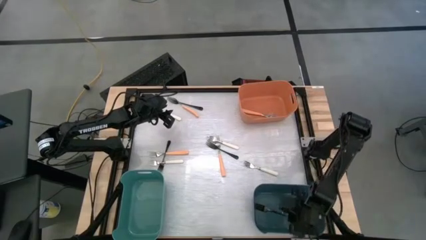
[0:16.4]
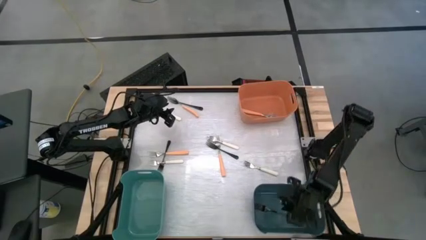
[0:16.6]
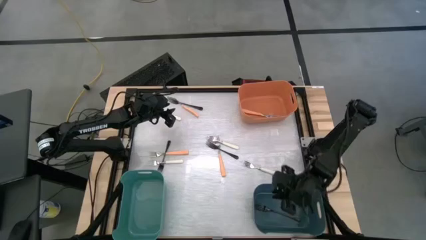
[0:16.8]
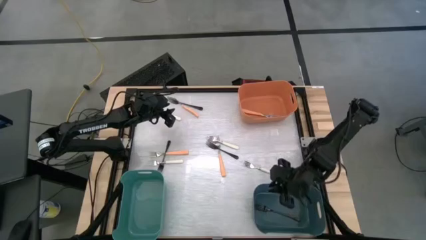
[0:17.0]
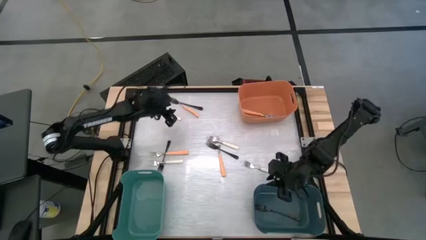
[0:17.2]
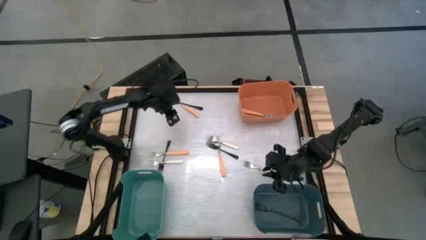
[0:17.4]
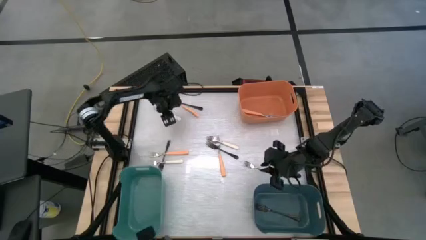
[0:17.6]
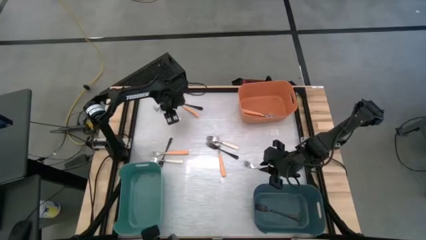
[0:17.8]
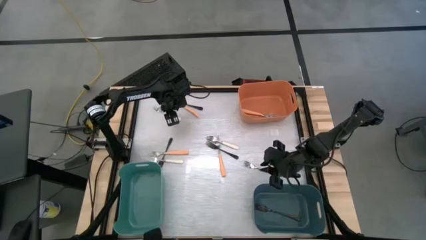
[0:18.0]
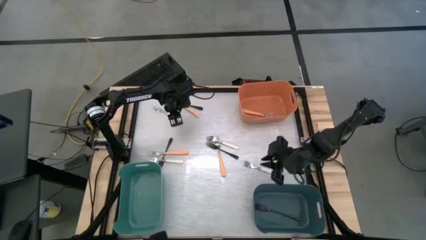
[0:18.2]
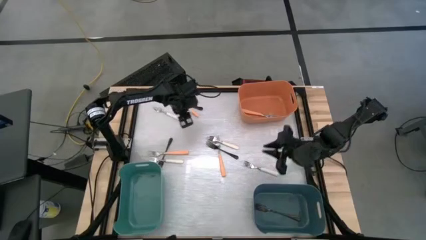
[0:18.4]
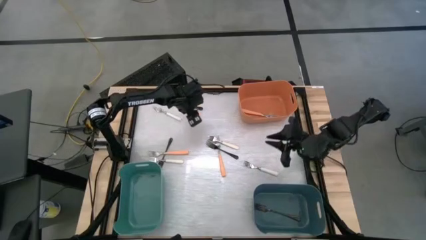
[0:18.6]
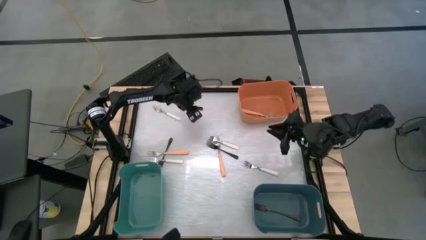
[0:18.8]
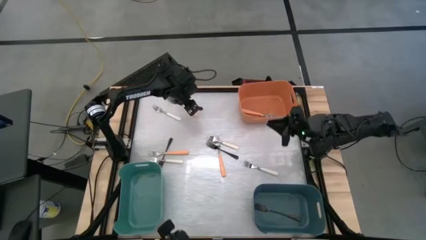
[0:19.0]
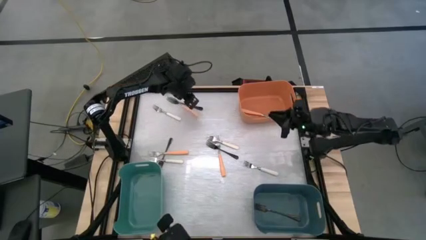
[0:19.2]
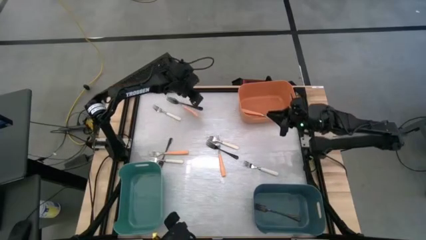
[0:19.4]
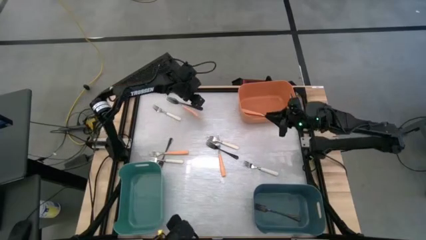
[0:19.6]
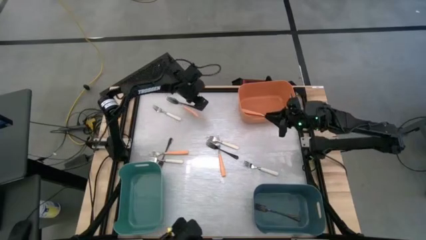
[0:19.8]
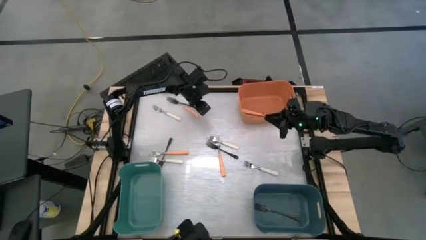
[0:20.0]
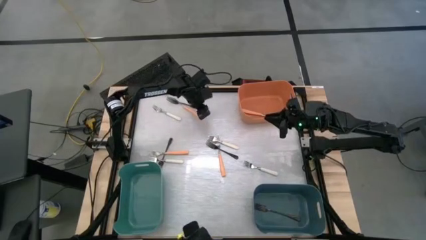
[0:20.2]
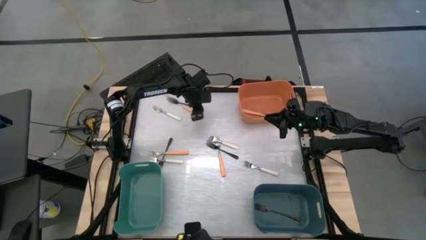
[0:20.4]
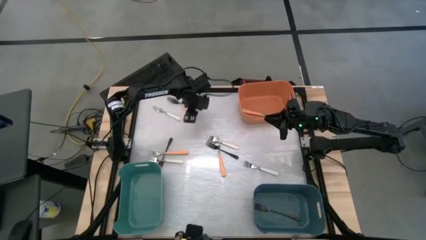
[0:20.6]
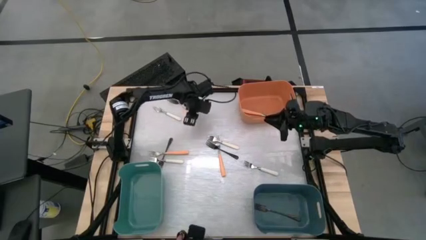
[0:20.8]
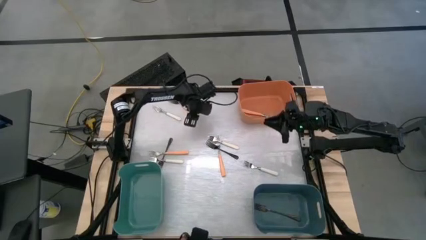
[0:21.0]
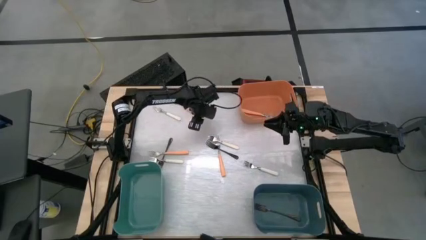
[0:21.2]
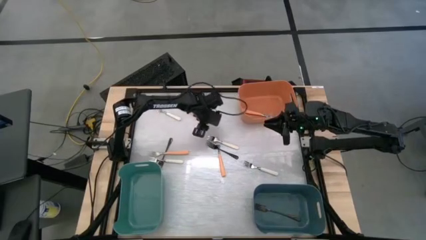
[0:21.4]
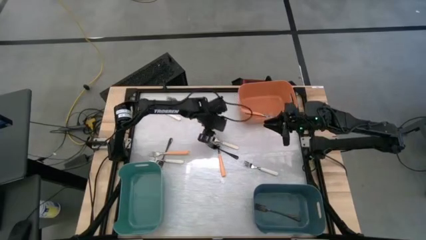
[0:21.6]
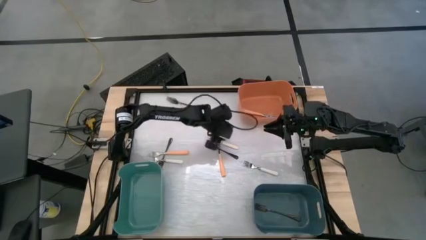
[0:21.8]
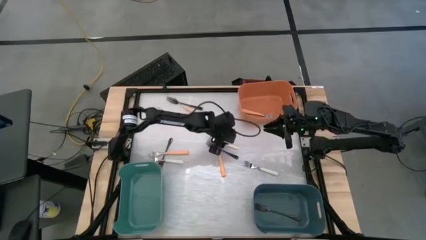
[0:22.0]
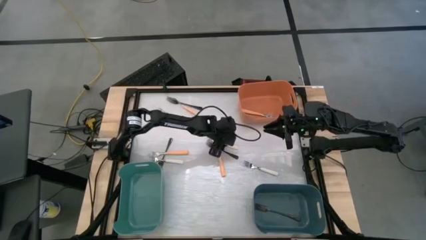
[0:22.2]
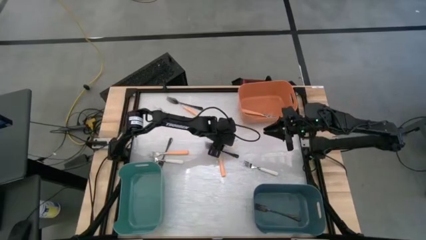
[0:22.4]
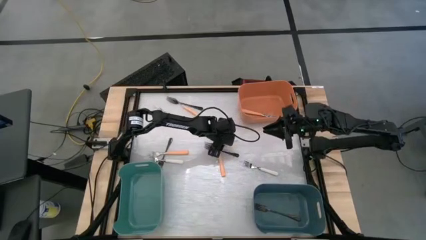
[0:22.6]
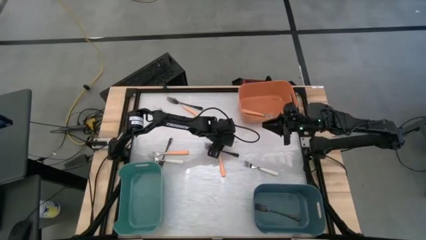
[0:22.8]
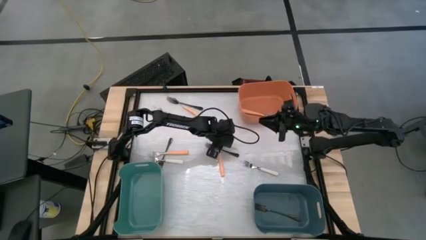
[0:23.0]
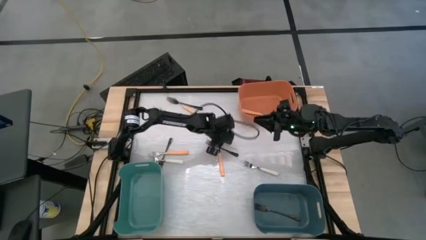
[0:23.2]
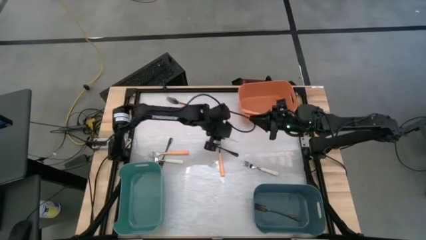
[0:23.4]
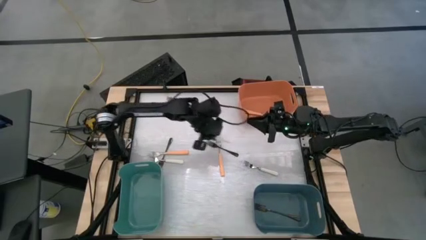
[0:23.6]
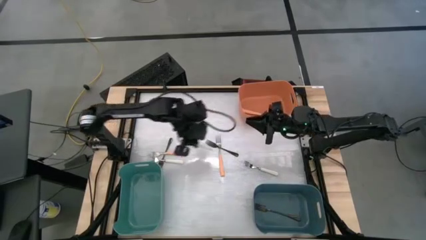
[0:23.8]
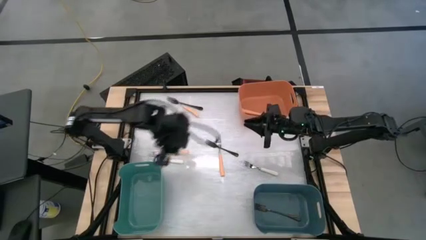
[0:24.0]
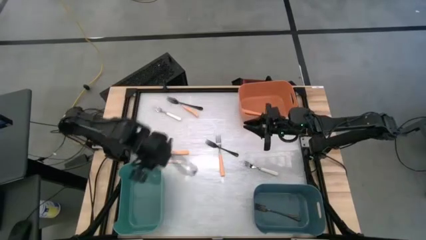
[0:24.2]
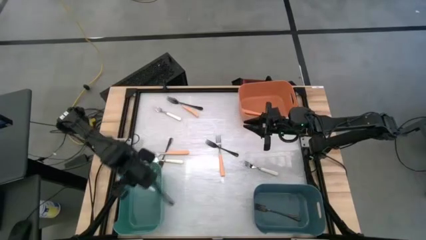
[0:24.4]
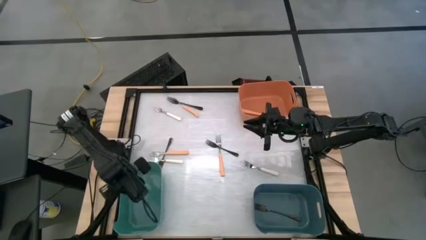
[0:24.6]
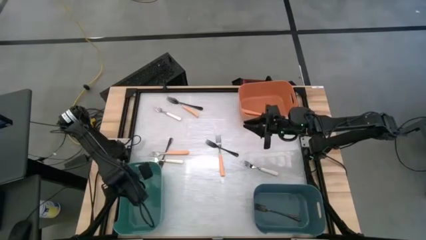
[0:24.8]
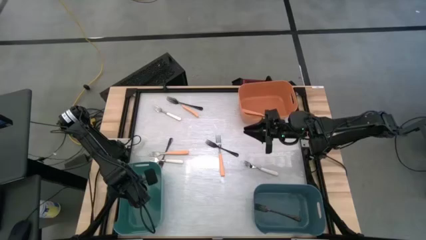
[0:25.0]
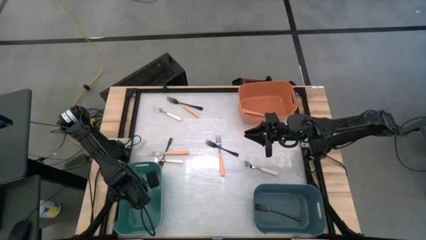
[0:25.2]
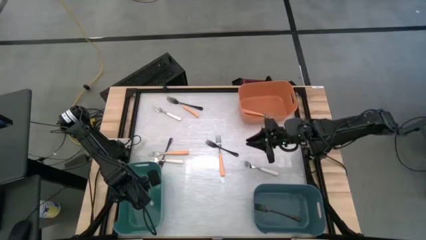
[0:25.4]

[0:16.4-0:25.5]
Task: Sort silverware by color (type)
Put the white fork into the green bin

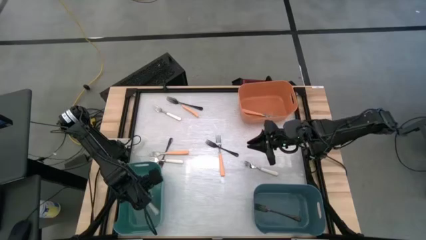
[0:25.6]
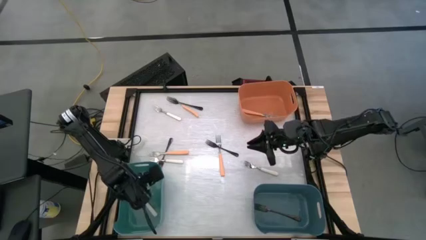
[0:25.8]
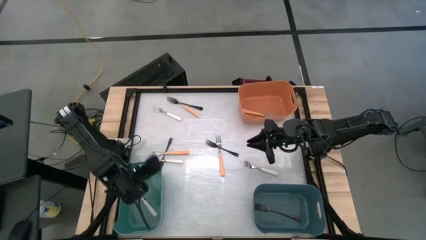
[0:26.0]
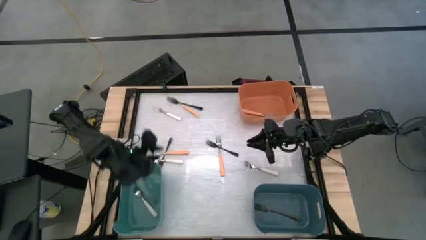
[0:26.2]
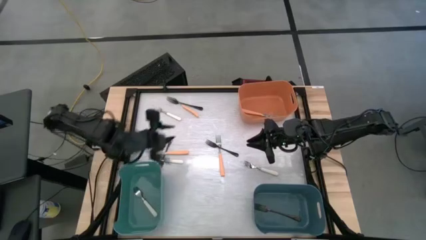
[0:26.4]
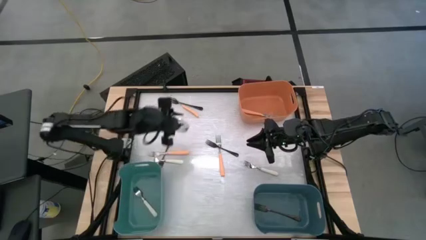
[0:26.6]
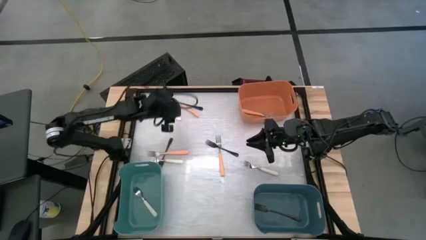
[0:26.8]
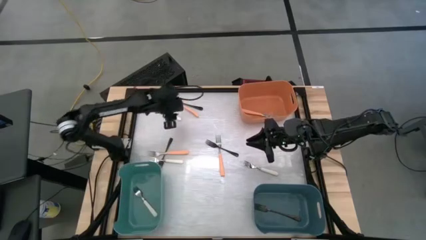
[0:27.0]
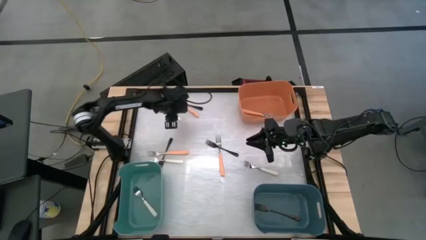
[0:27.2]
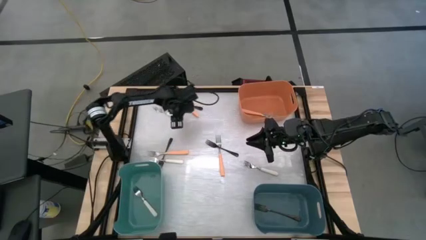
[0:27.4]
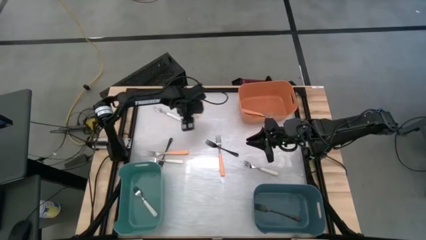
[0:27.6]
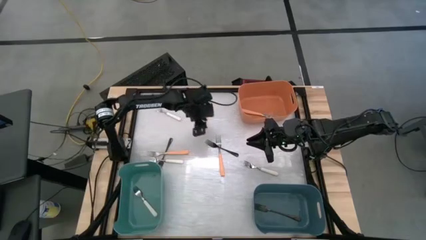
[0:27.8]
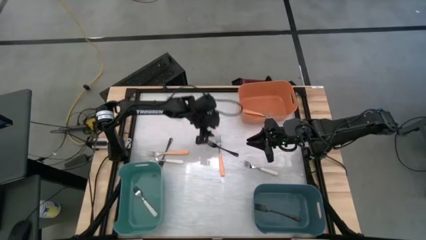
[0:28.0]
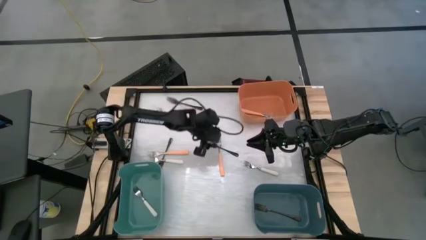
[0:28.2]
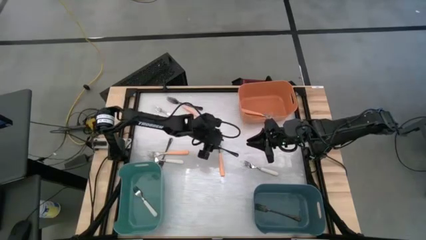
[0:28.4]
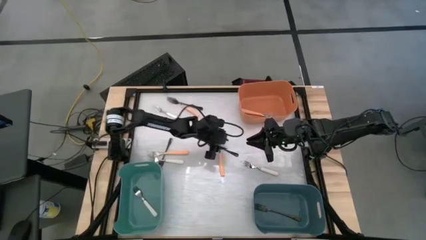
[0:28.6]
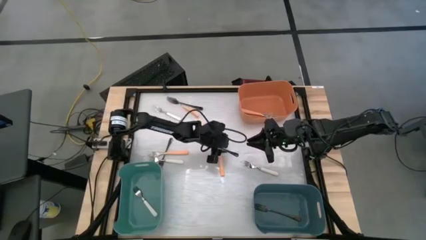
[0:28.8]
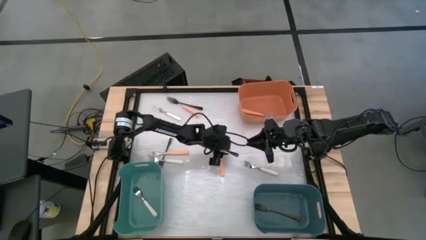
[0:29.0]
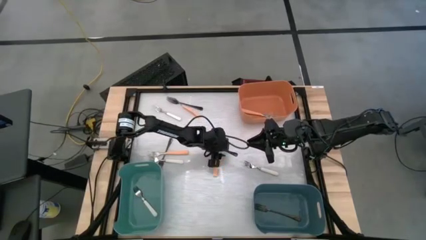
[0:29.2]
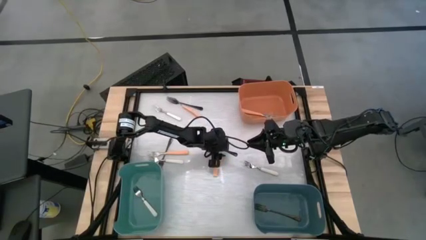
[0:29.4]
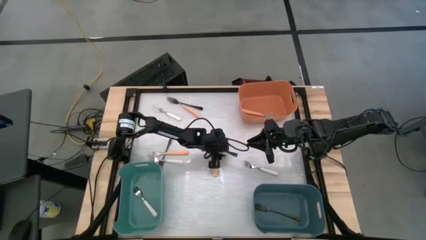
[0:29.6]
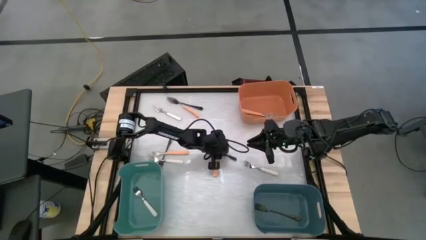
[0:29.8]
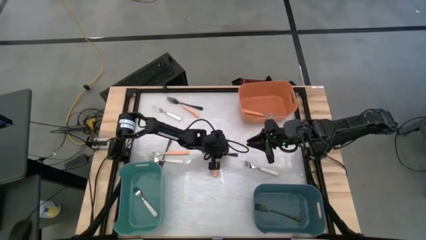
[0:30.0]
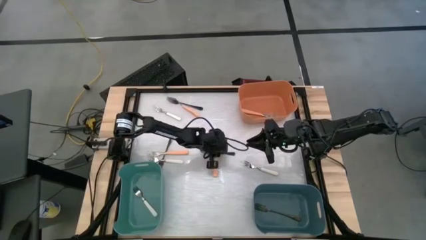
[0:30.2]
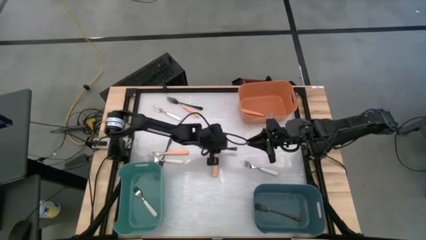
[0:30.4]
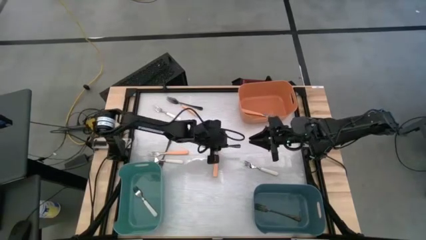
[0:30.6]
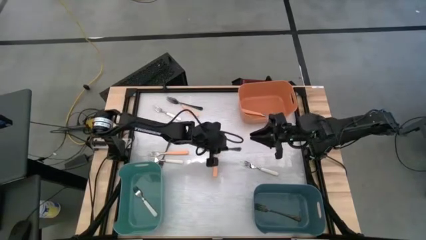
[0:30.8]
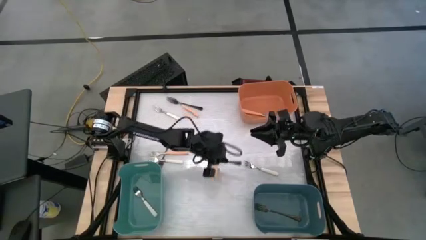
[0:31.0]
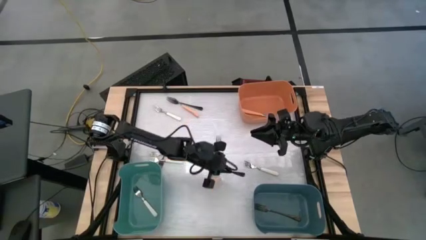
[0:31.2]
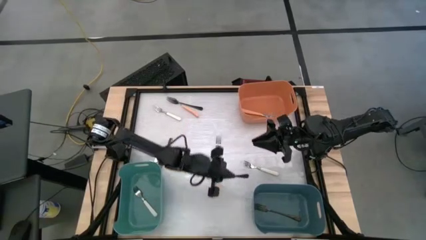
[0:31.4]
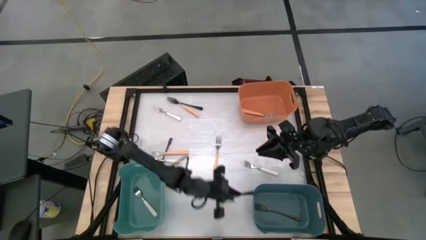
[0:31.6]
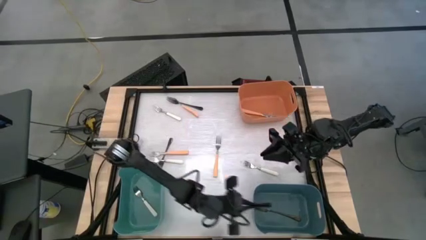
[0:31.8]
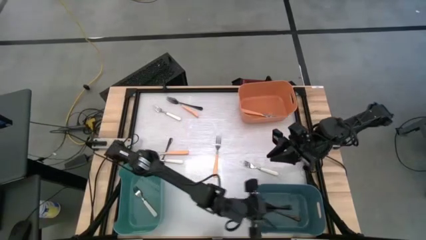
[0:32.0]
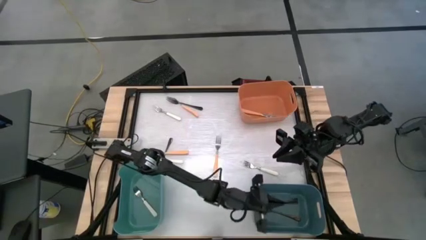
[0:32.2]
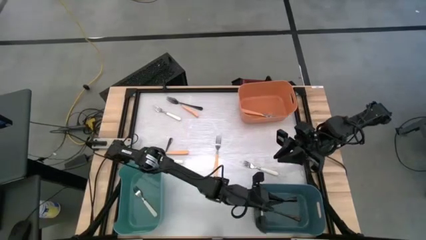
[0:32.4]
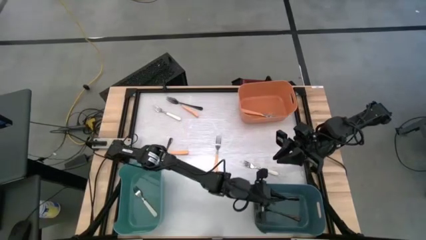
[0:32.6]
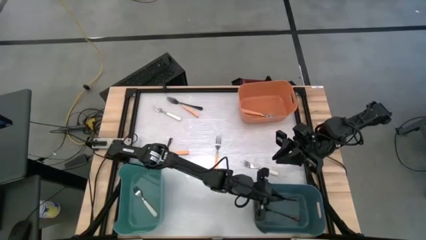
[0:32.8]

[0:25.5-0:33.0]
Put the black fork into the blue bin
